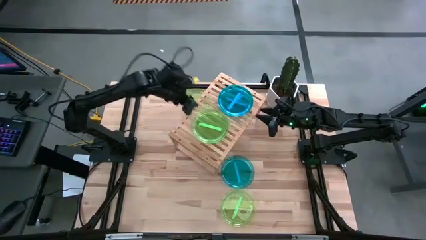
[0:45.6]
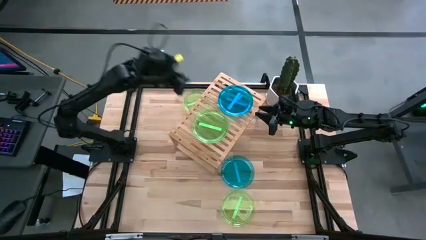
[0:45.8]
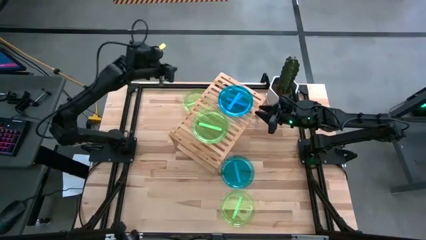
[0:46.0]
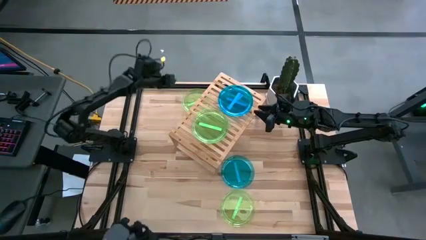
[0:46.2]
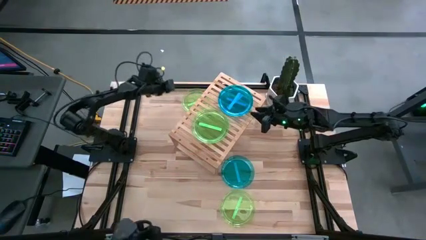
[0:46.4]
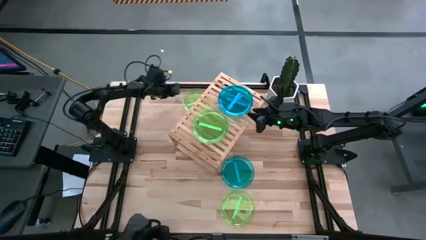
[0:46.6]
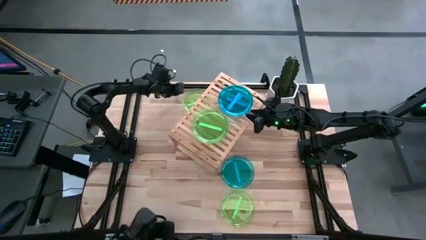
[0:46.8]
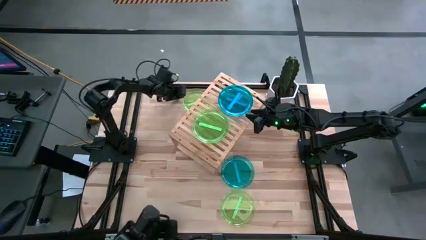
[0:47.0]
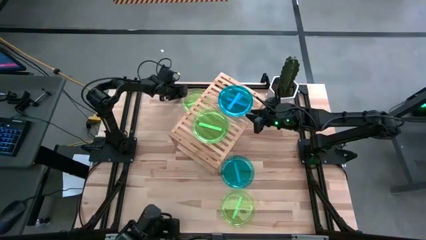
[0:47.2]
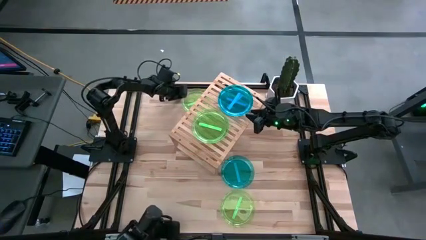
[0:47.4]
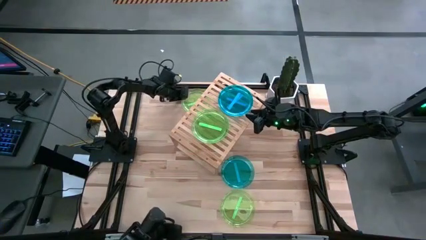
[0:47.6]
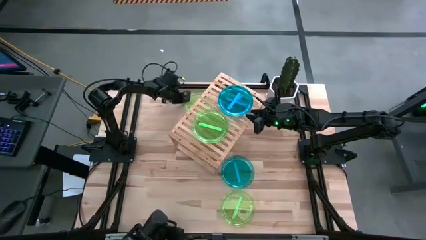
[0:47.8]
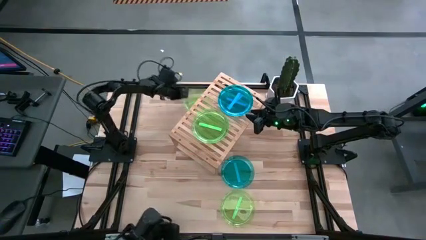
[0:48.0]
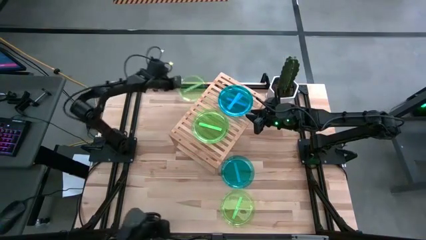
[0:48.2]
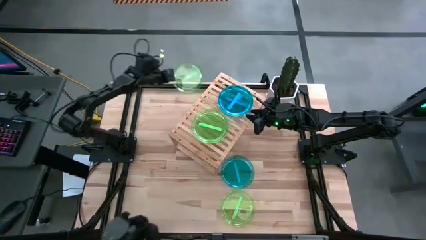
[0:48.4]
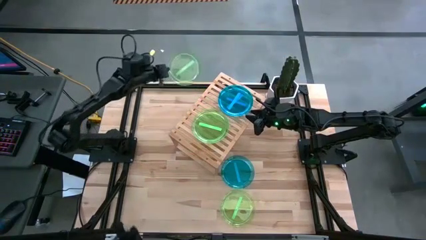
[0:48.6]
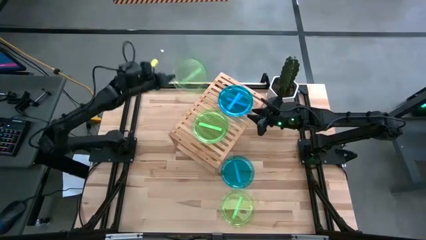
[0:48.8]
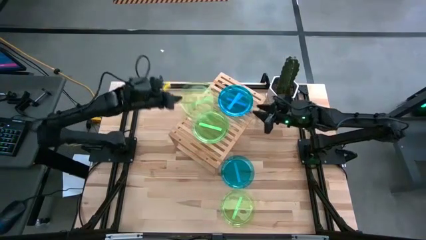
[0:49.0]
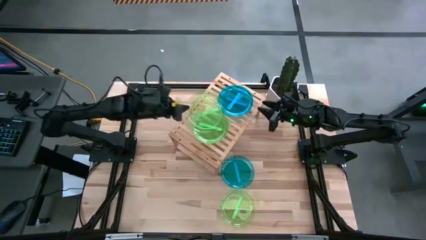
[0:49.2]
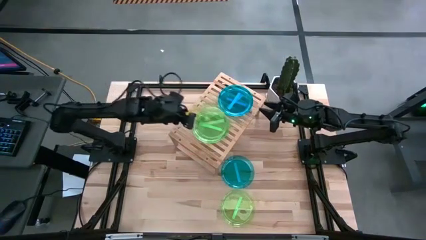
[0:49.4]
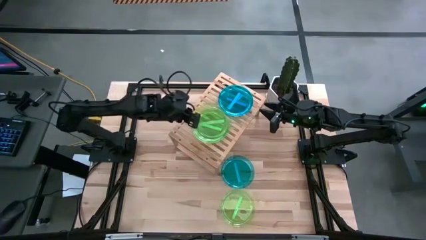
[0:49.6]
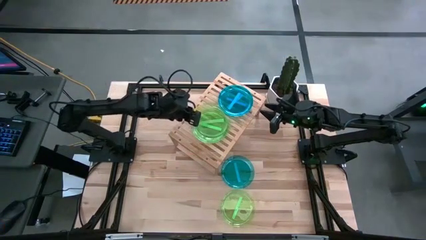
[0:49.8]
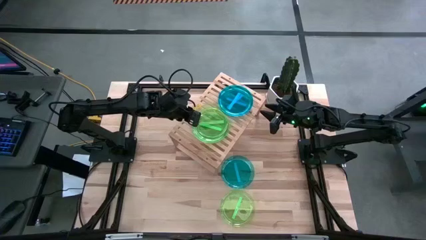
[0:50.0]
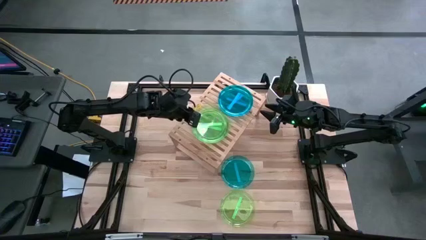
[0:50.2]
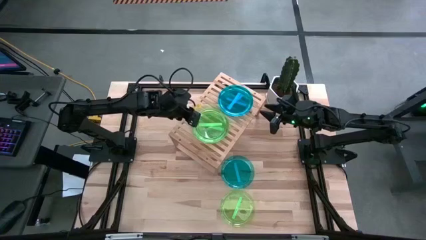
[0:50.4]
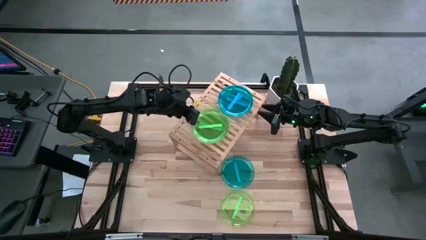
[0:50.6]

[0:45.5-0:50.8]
Task: Place and stack plates onto a shelf
Stack the top green plate on top of the green plate on the shelf

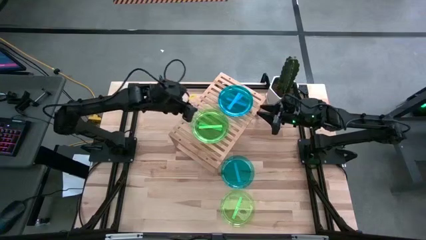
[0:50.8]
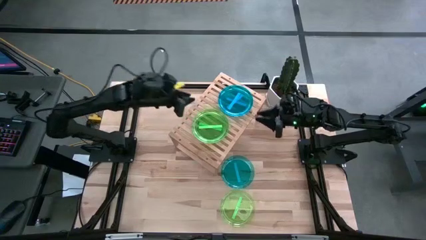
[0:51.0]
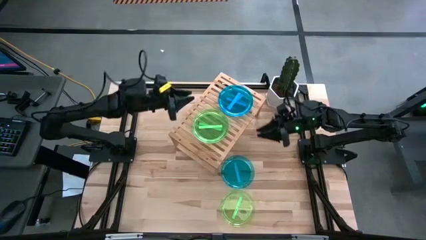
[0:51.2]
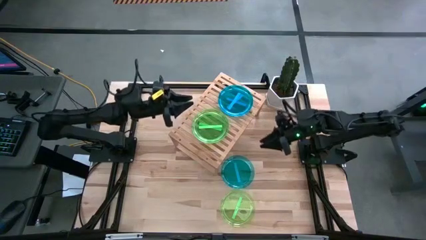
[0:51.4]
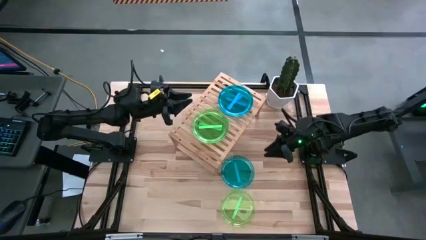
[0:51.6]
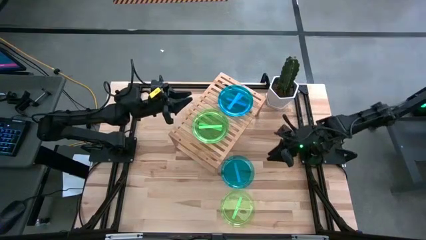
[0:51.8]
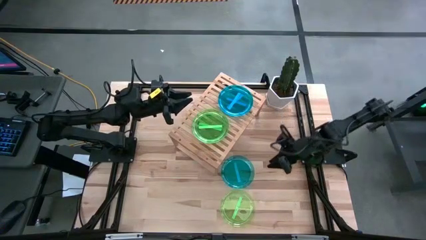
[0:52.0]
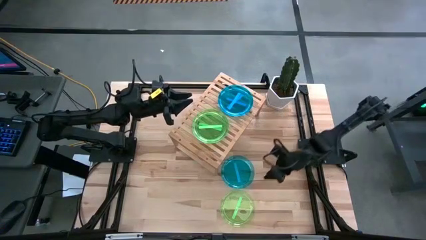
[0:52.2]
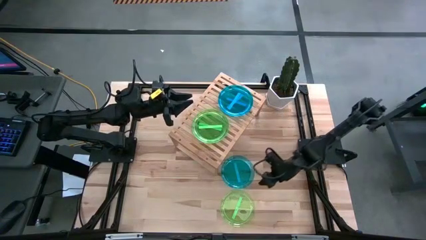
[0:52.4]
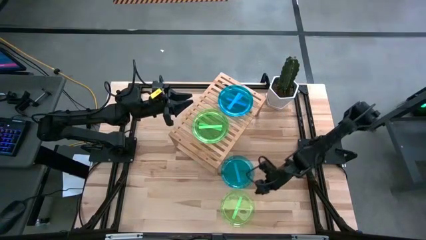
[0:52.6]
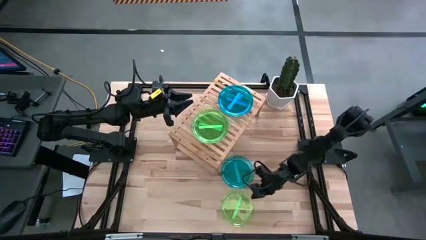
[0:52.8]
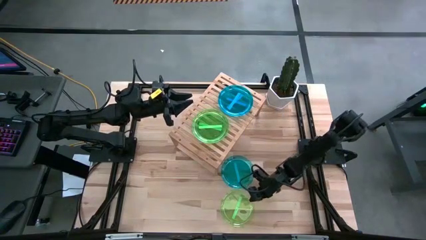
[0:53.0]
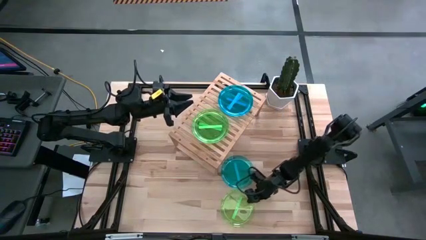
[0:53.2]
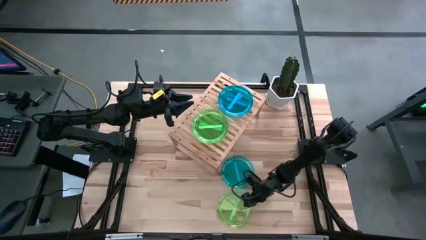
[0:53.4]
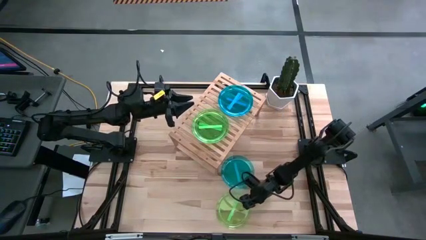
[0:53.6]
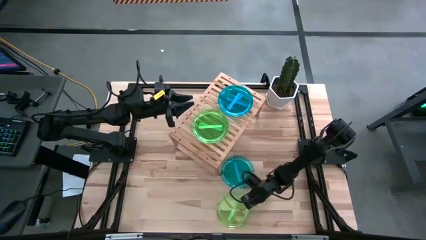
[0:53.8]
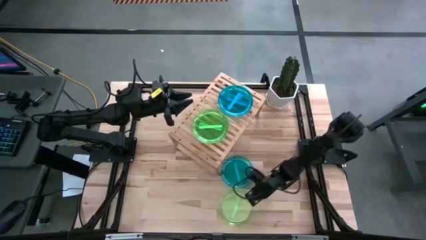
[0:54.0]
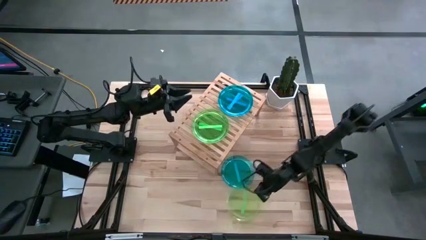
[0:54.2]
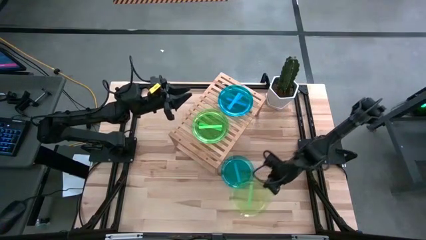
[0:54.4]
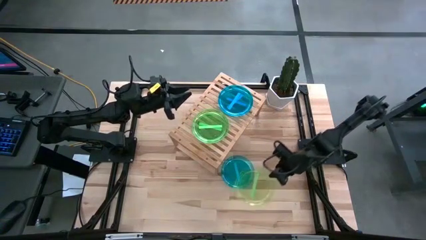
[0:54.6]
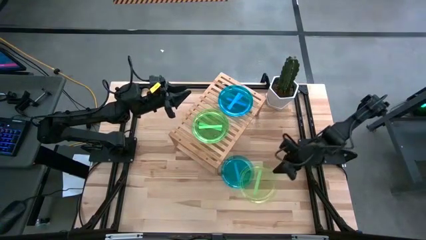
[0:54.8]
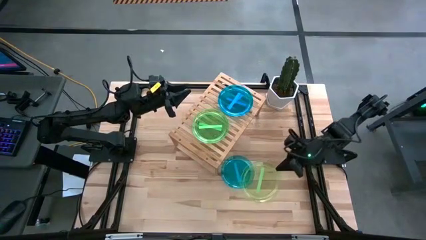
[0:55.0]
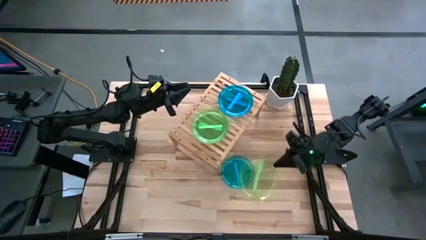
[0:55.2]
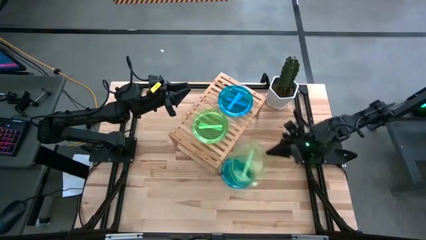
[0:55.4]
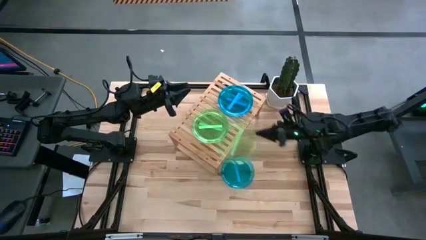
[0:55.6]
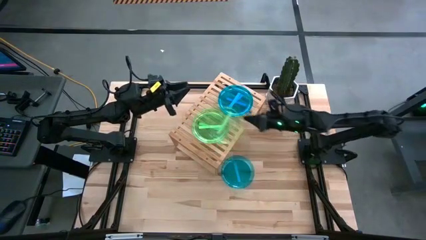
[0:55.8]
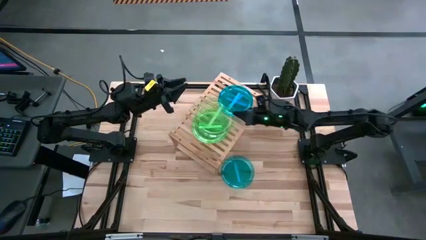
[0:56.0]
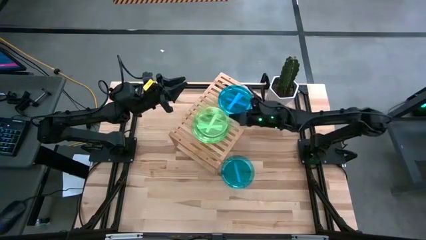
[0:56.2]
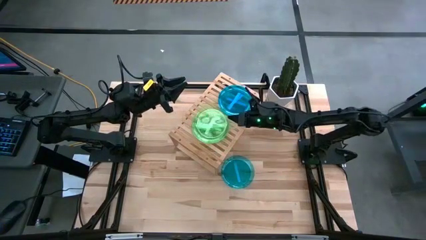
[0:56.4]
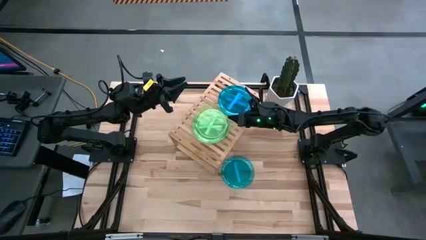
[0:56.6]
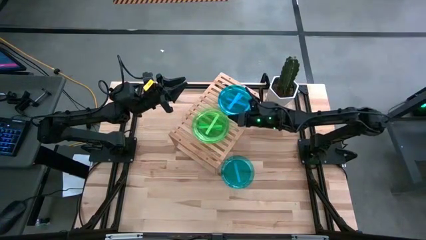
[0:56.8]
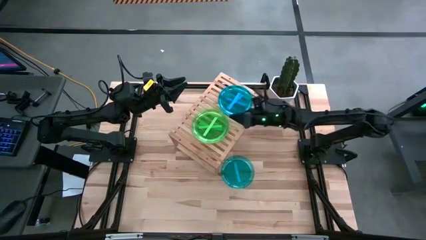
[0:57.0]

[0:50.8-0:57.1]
Stack the green plate on top of the green plate on the shelf

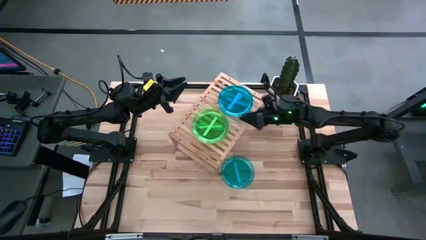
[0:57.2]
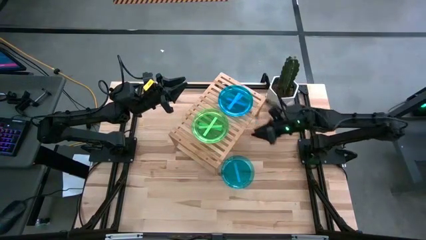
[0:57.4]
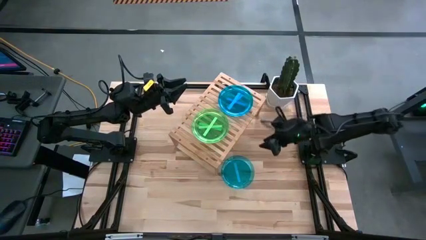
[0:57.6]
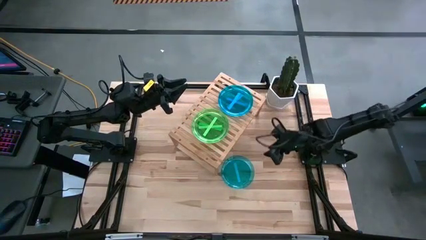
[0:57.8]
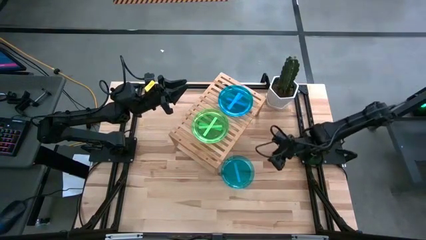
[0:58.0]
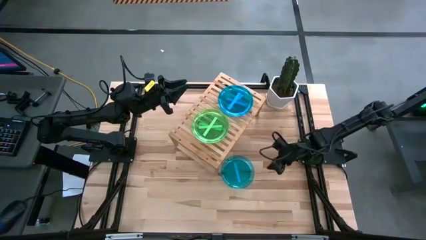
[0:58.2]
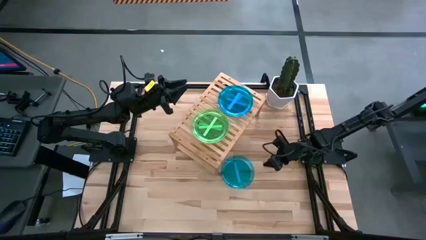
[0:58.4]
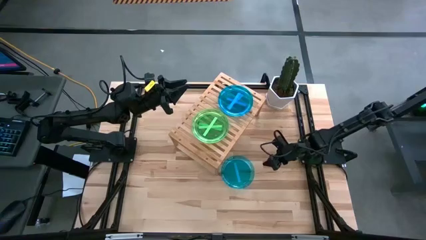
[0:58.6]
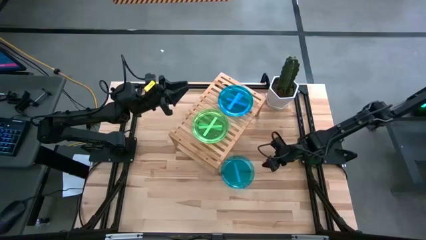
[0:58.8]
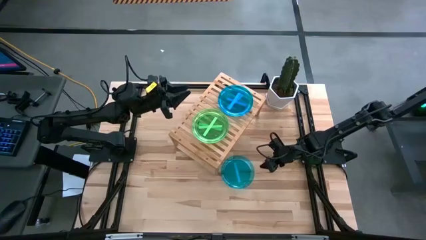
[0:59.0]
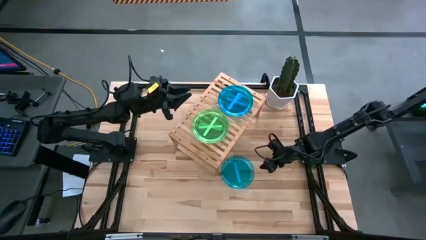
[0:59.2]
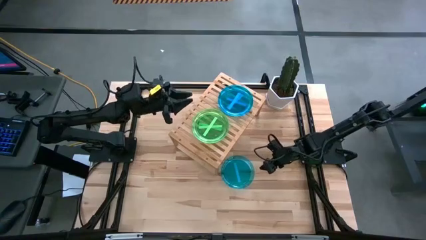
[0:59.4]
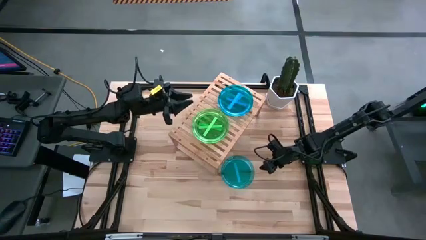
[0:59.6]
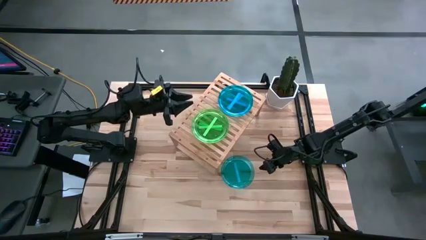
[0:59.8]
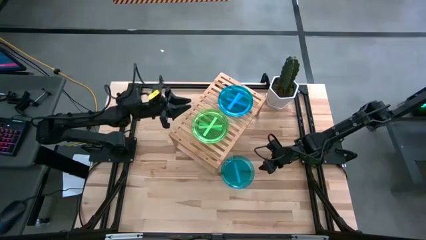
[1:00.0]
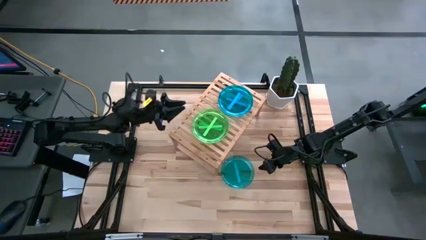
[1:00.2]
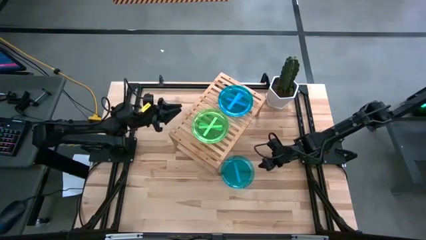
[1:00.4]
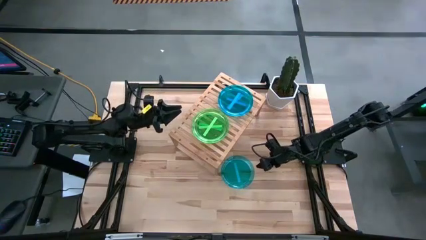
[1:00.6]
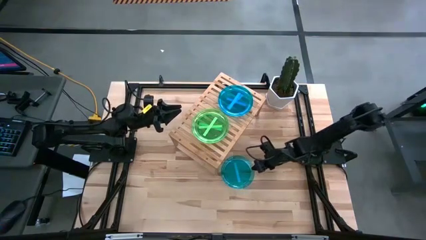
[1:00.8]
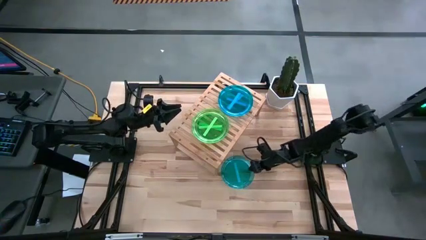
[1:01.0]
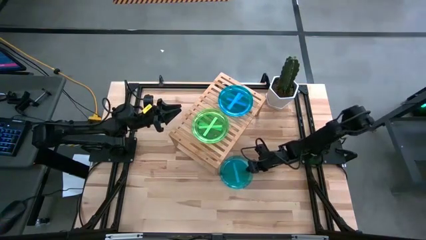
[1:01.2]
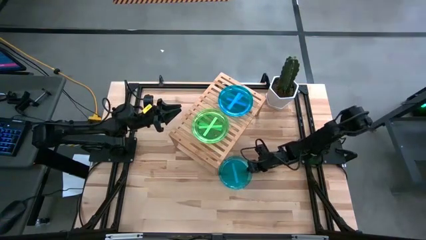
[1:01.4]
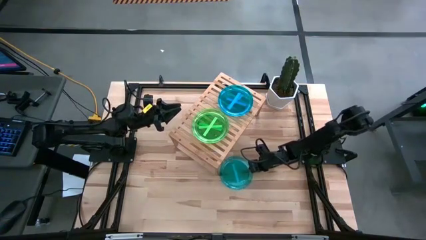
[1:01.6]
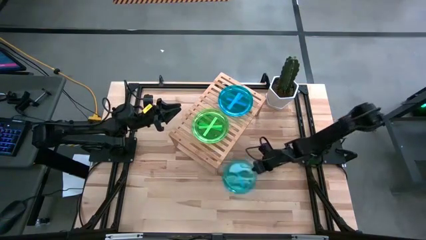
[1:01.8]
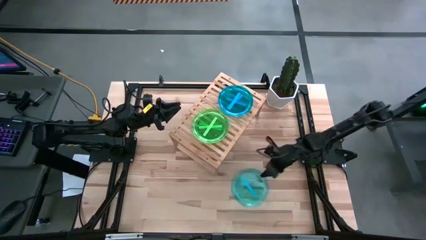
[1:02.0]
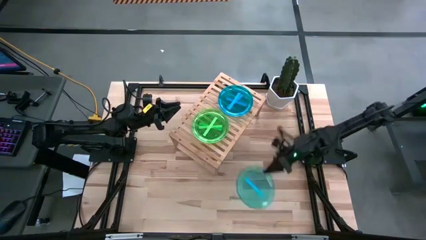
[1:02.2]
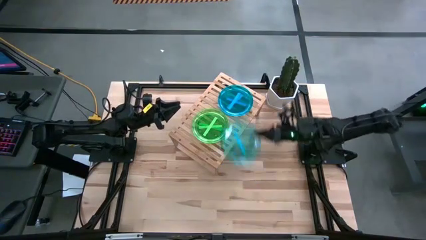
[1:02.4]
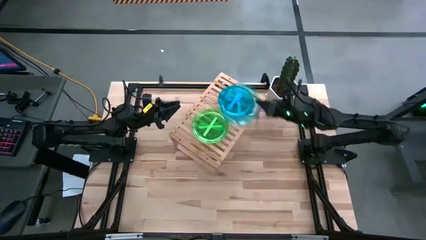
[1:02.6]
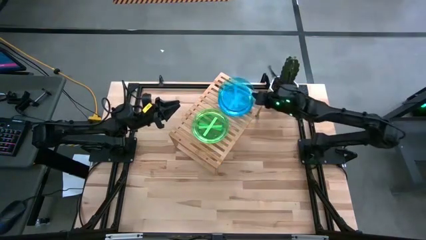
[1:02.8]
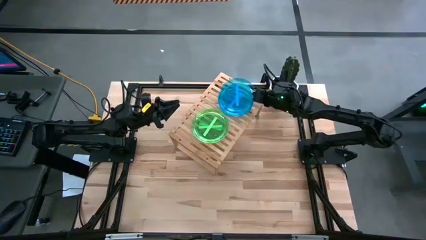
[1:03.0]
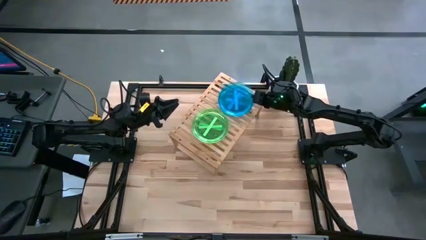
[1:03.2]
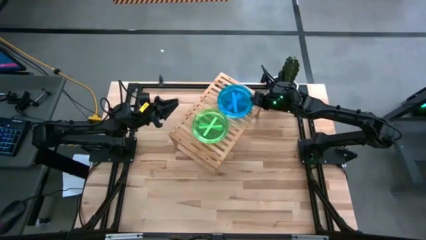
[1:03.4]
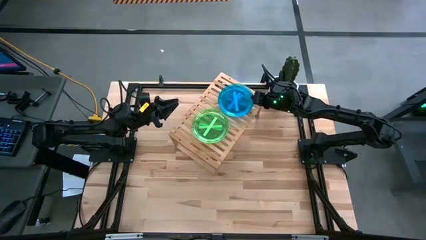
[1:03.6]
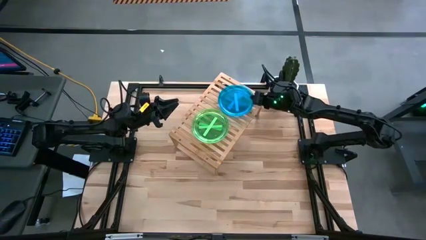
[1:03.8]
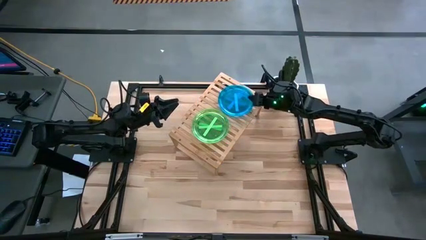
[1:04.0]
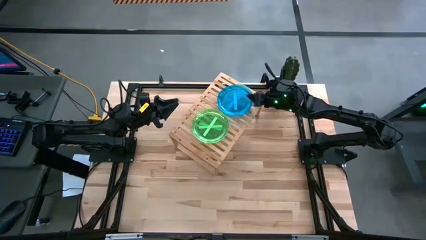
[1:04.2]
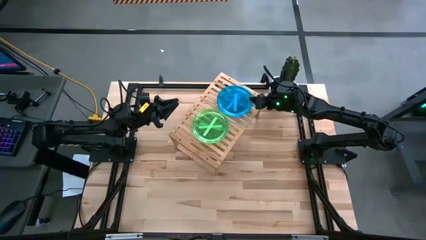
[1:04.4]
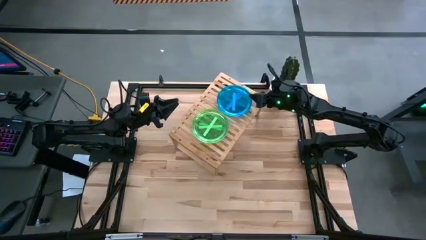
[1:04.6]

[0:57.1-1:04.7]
Stack the blue plate on top of the blue plate on the shelf
